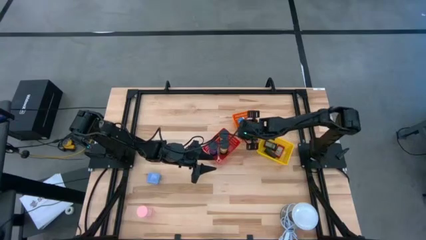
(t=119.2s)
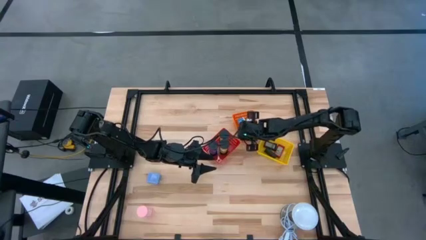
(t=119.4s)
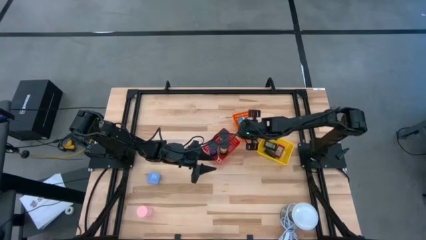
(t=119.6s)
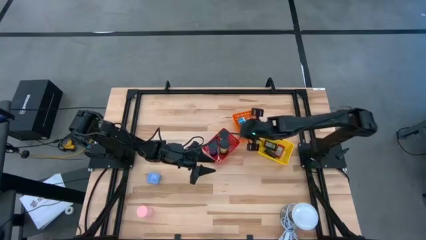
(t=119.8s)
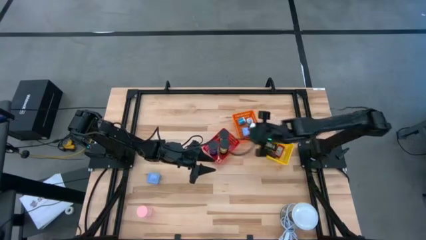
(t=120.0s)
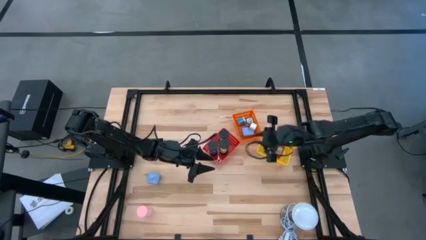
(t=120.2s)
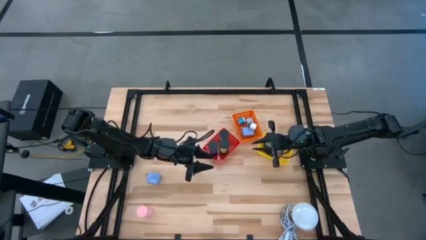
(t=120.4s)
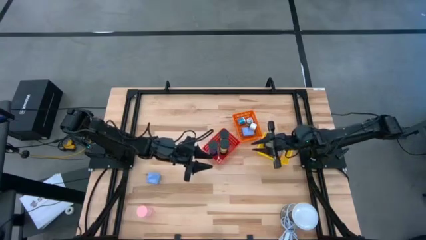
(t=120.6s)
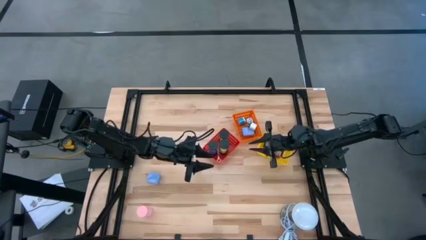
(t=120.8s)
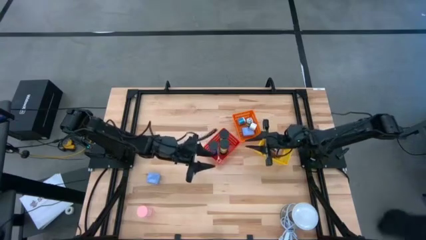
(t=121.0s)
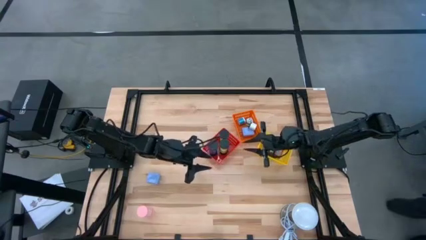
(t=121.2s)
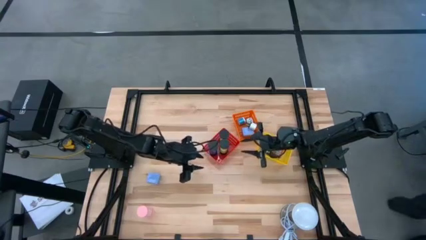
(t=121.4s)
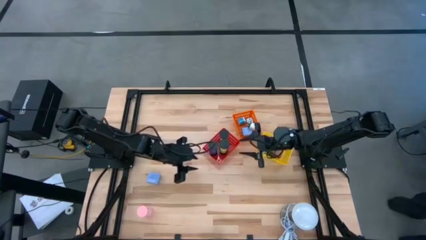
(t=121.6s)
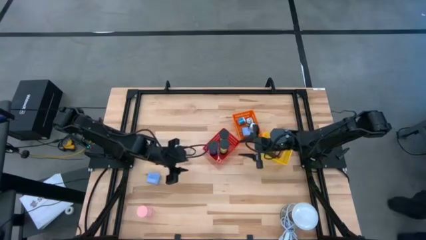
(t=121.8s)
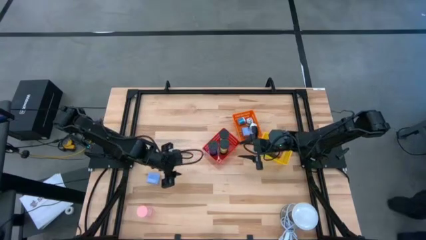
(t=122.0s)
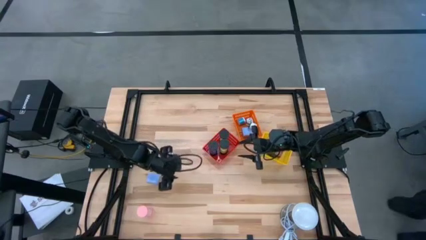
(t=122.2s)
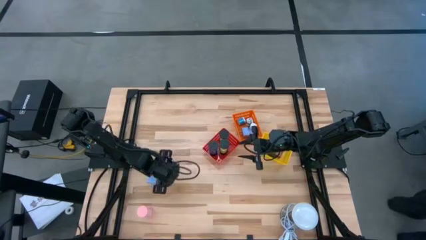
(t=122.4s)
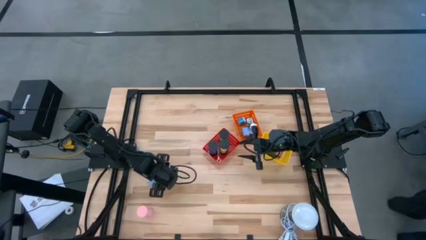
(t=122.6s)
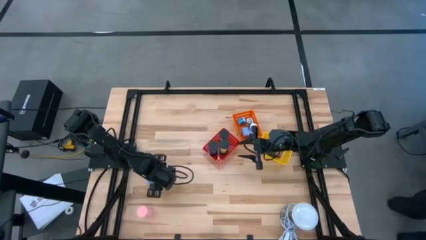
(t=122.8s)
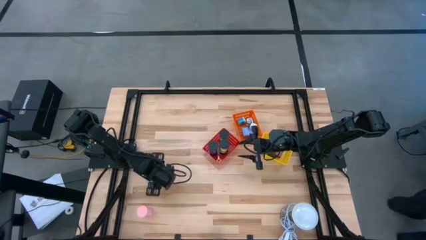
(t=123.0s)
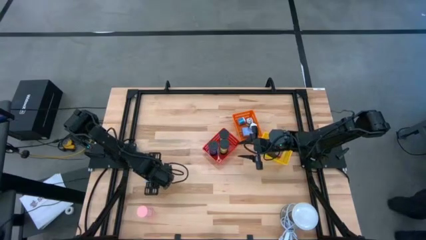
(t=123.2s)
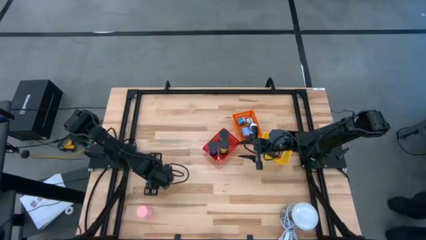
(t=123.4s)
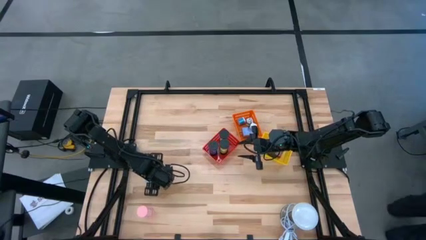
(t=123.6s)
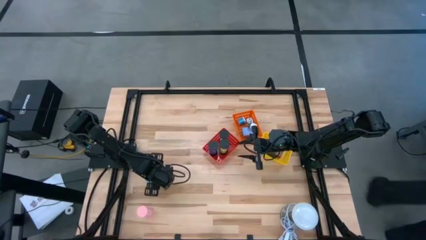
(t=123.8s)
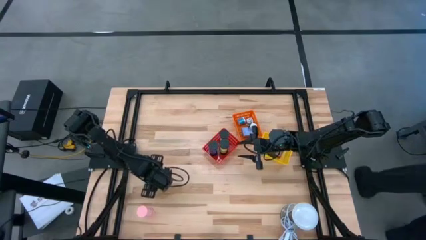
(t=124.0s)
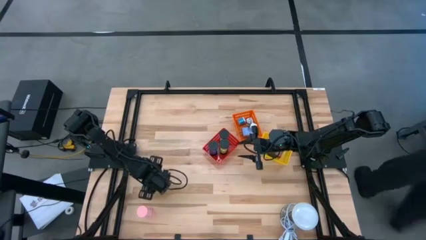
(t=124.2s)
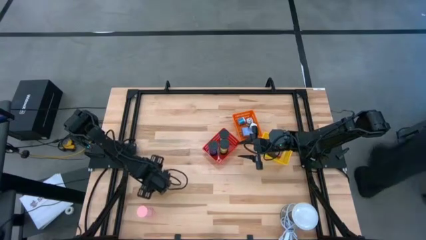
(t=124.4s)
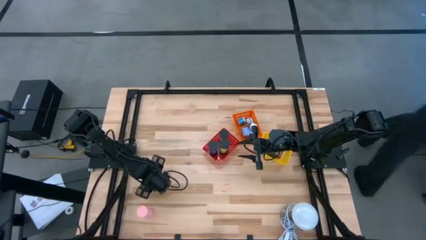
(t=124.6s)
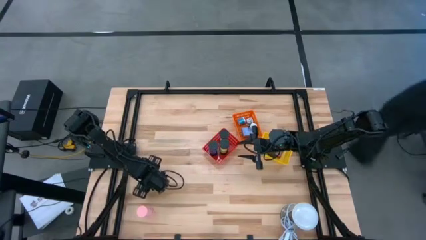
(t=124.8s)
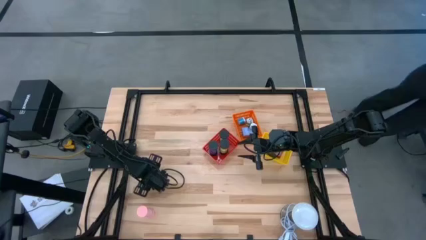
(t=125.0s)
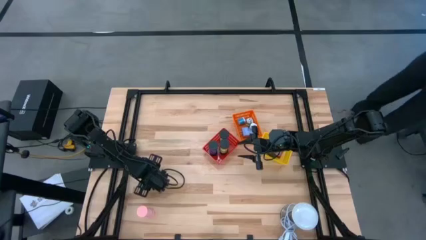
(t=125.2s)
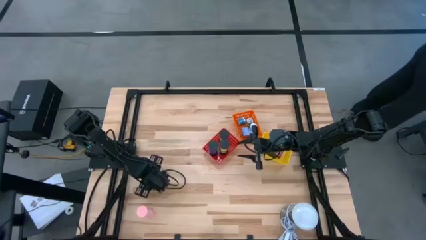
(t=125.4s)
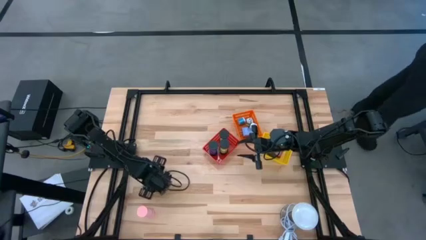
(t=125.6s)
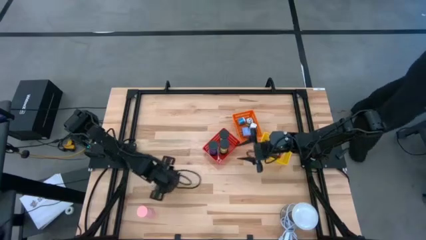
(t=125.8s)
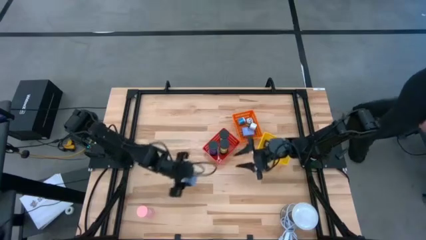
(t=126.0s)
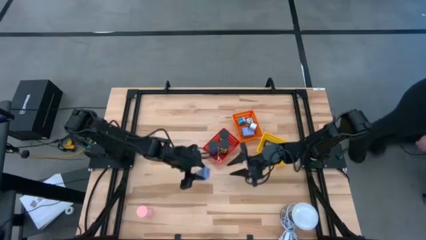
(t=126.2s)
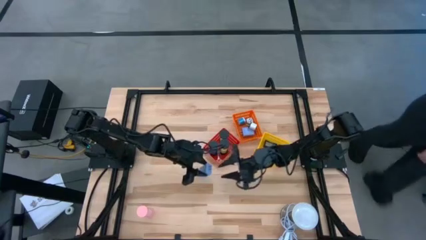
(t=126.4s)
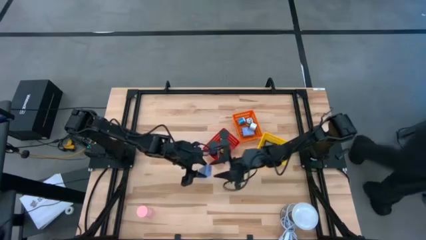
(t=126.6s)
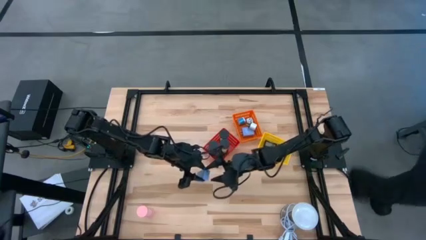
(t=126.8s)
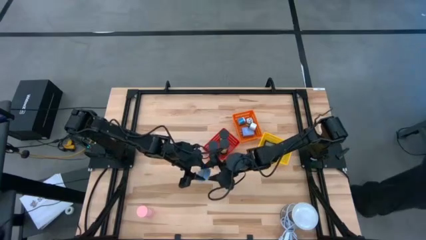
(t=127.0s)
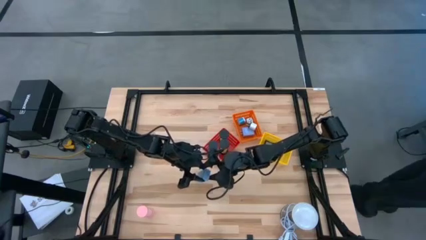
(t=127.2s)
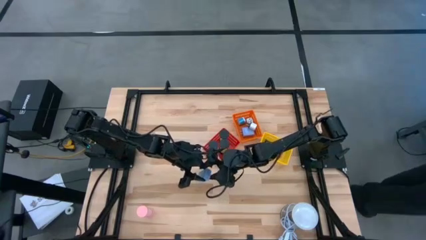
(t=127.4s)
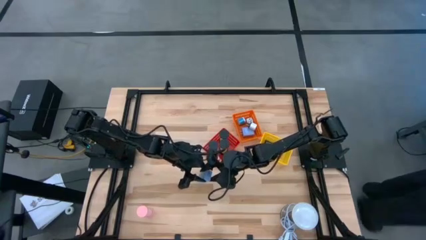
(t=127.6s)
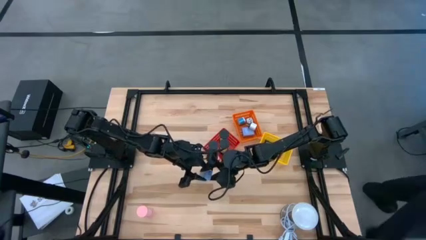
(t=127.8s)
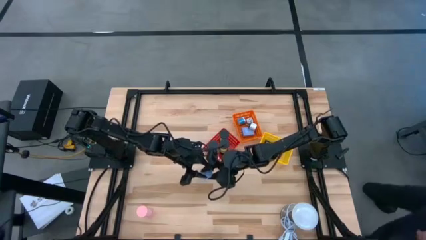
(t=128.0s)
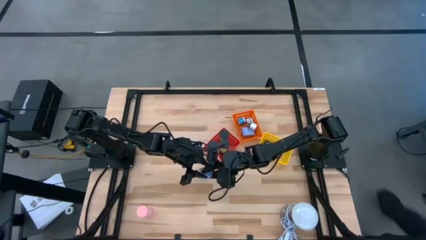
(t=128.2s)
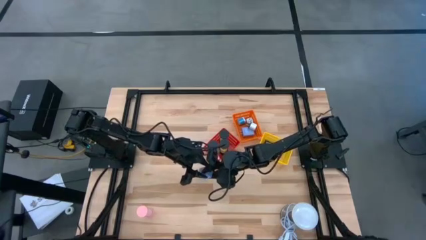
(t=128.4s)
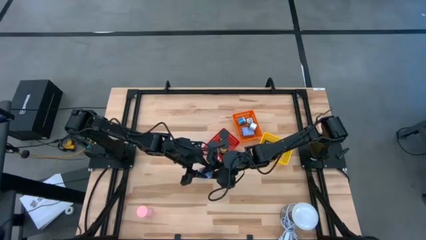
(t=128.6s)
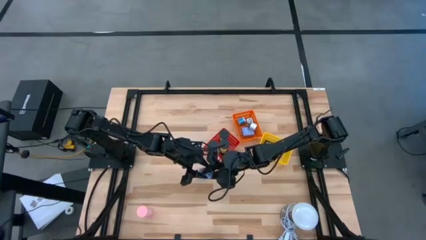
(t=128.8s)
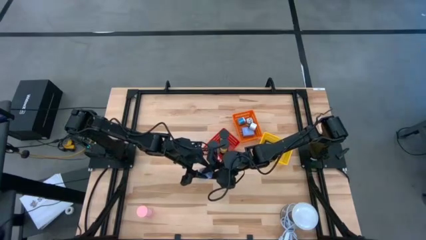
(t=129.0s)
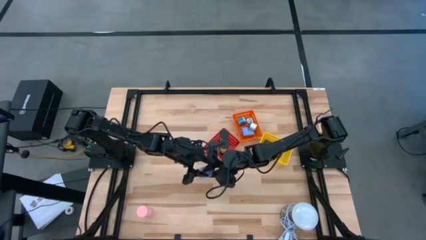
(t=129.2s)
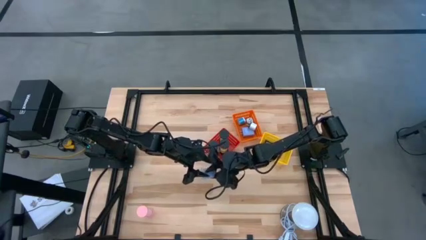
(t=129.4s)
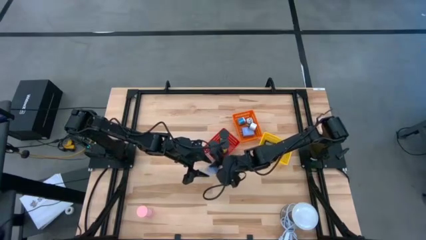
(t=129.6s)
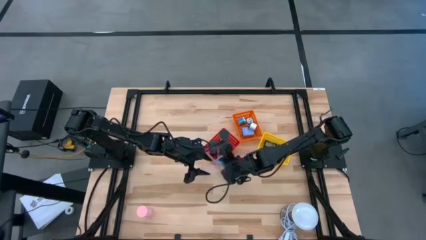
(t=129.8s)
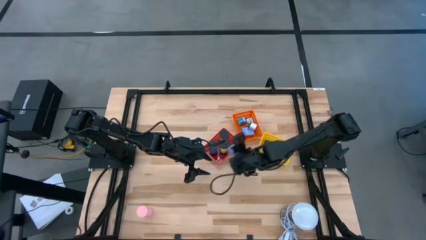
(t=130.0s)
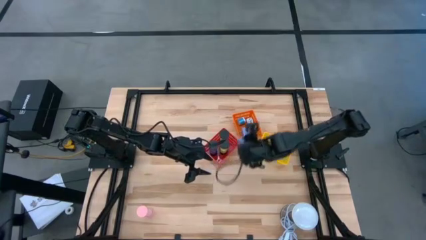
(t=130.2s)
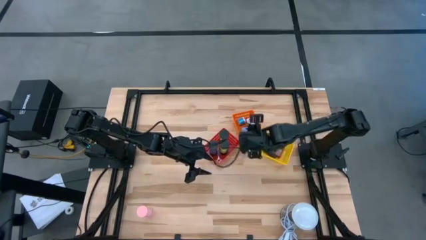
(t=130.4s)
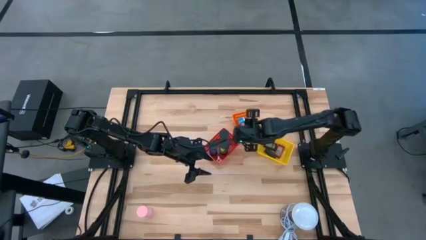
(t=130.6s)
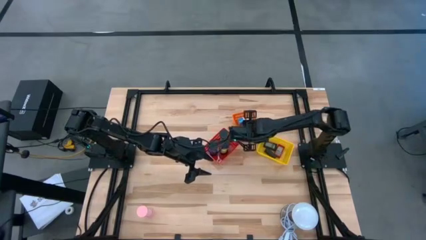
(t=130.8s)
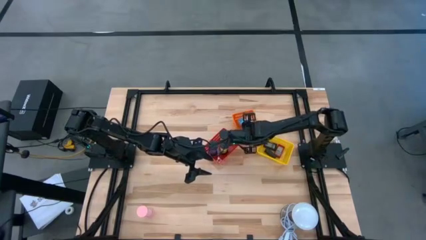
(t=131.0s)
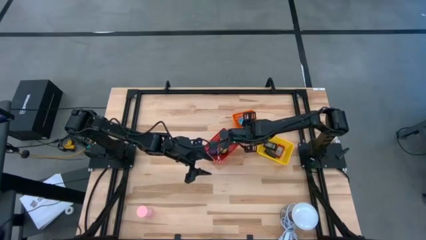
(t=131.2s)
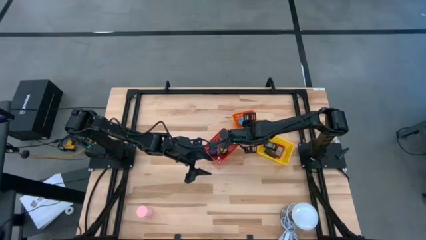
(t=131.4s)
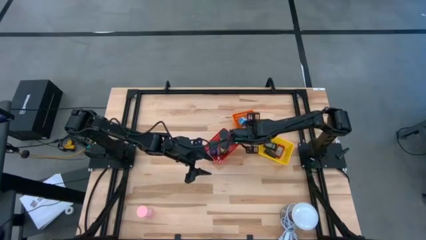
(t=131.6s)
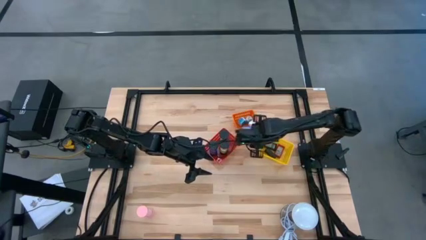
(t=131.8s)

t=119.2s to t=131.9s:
Task: Pick & Place Office items
Put the blue charger adapter into the orange bin

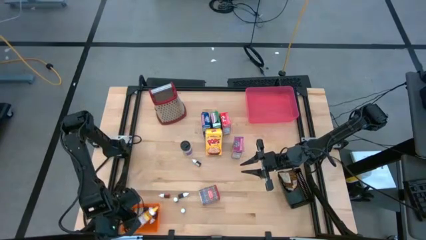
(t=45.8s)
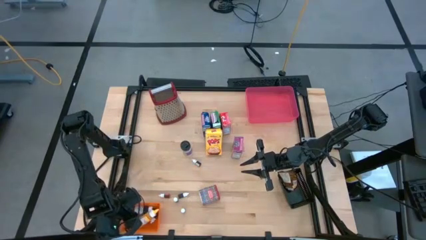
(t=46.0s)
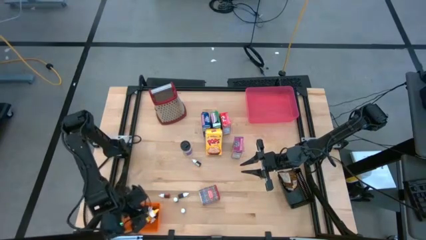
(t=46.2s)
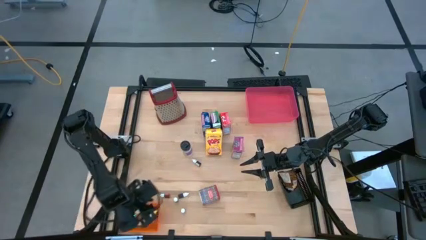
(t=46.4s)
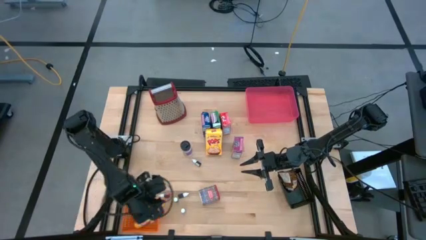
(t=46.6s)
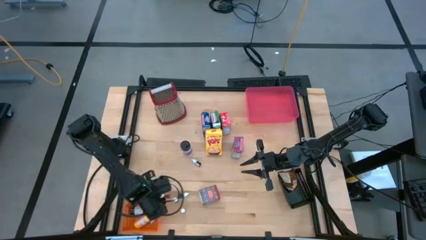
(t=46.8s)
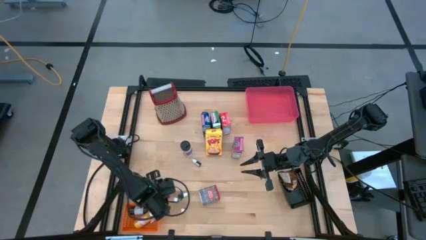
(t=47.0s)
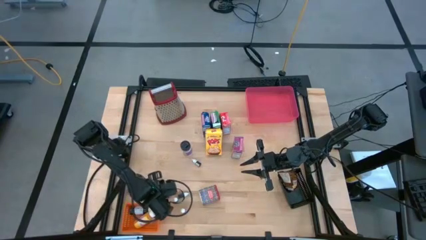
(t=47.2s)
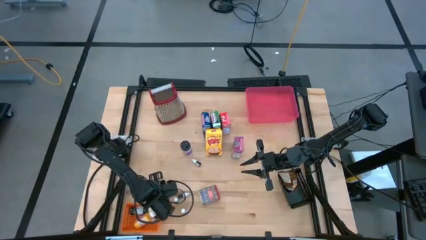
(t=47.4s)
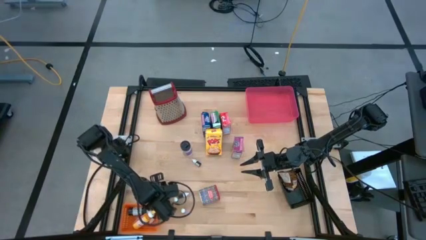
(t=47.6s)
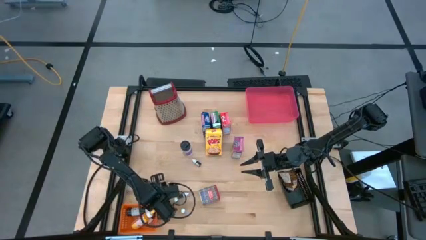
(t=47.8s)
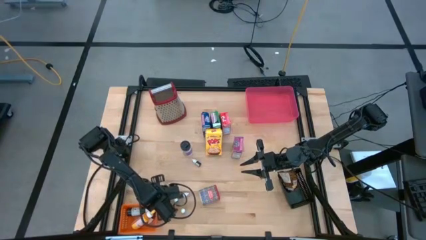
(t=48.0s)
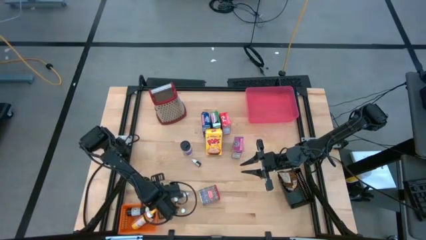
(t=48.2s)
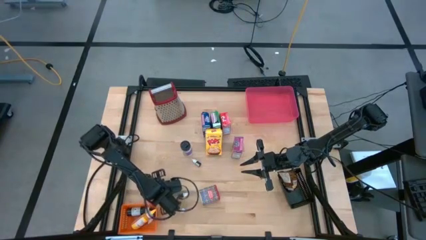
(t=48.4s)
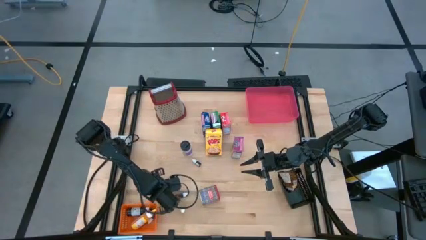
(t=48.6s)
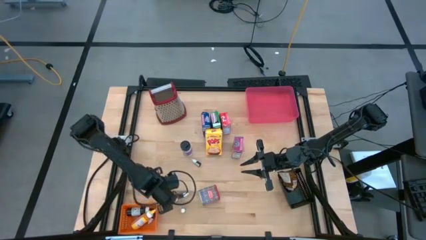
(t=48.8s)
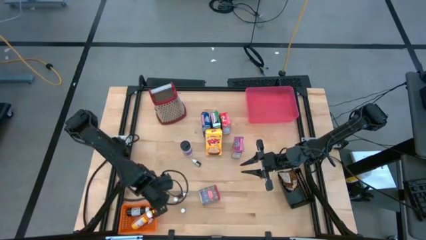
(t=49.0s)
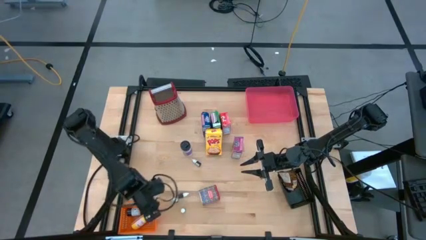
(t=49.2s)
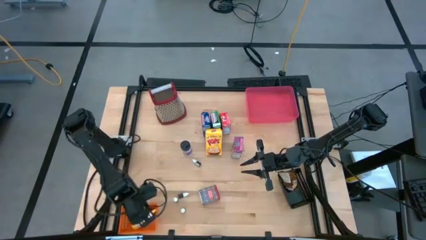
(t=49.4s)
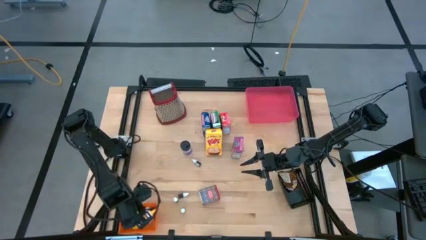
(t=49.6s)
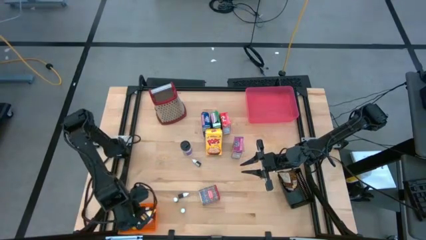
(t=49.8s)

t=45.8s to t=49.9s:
Task: Pick & Place Kitchen Items
Put the small brown food coloring bottle into the orange bin
